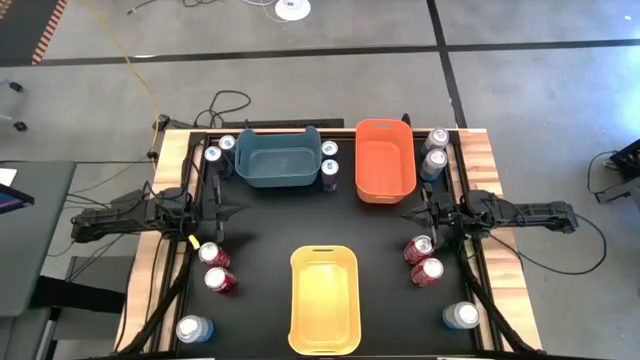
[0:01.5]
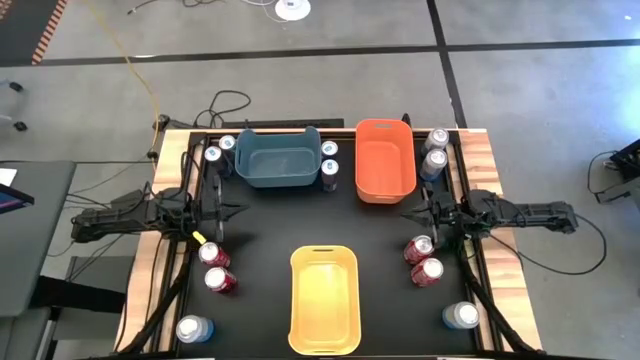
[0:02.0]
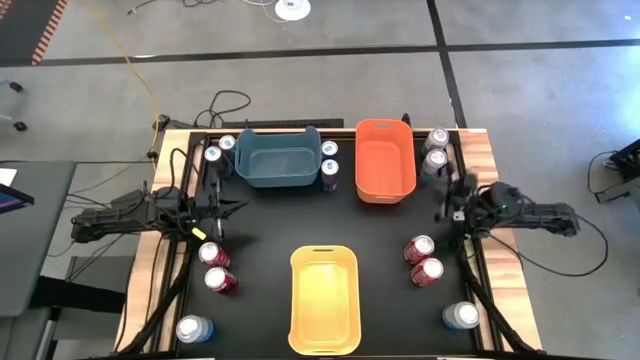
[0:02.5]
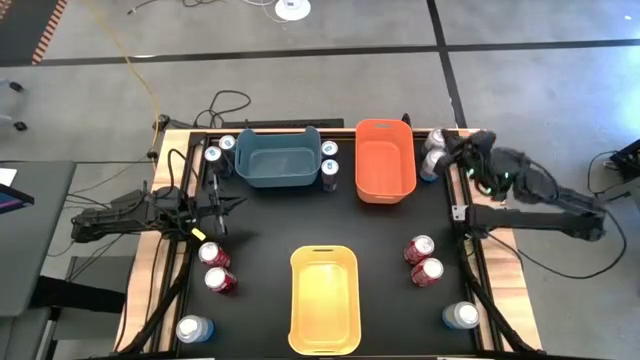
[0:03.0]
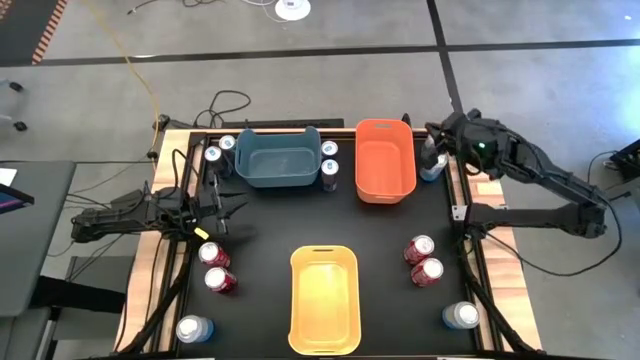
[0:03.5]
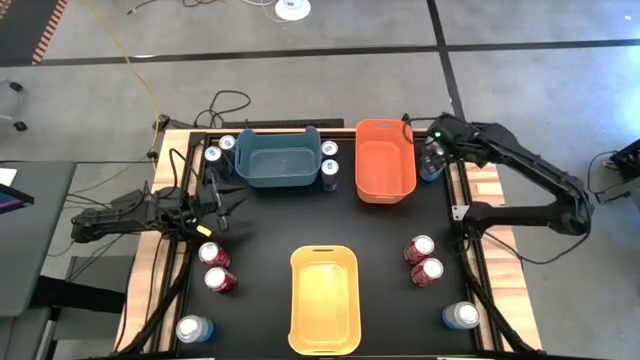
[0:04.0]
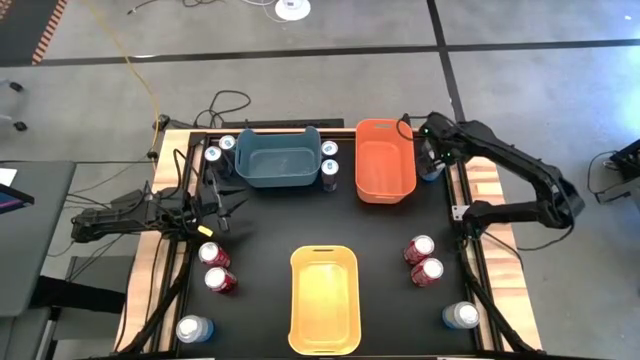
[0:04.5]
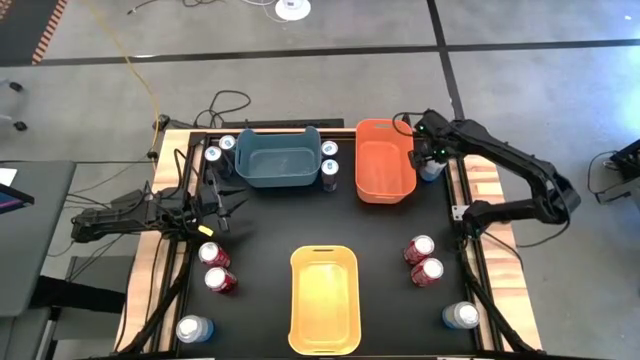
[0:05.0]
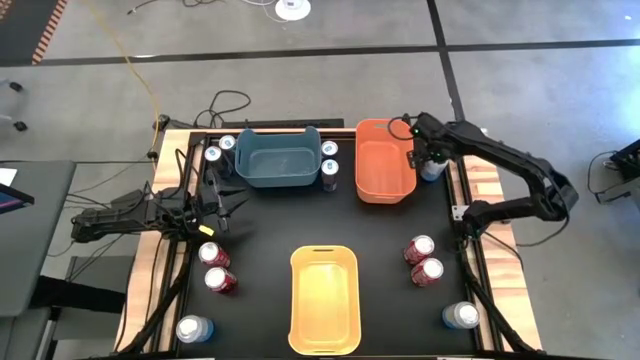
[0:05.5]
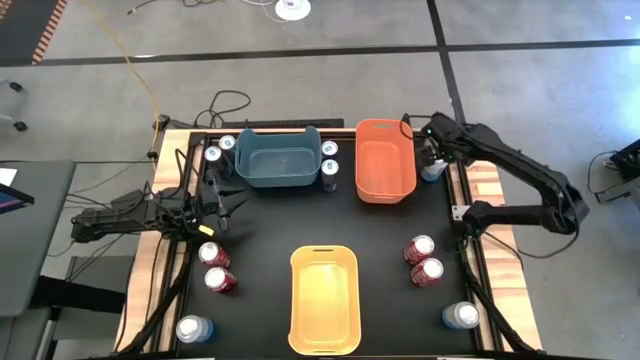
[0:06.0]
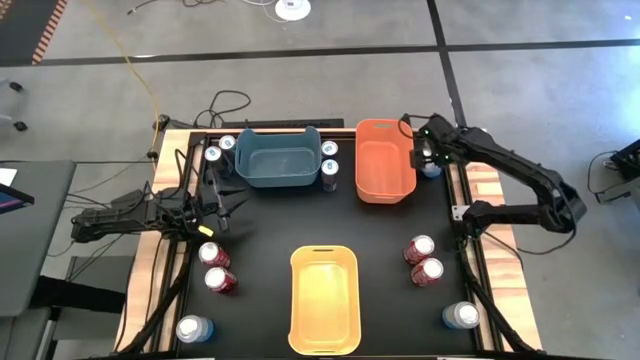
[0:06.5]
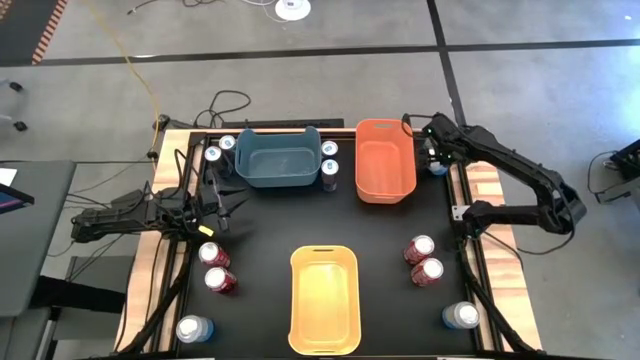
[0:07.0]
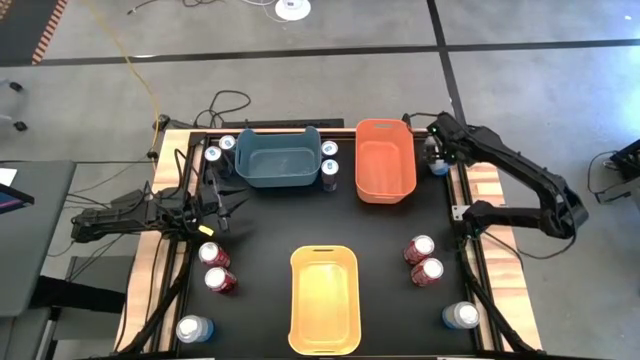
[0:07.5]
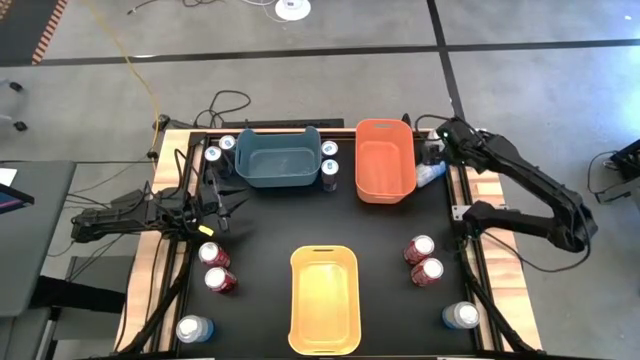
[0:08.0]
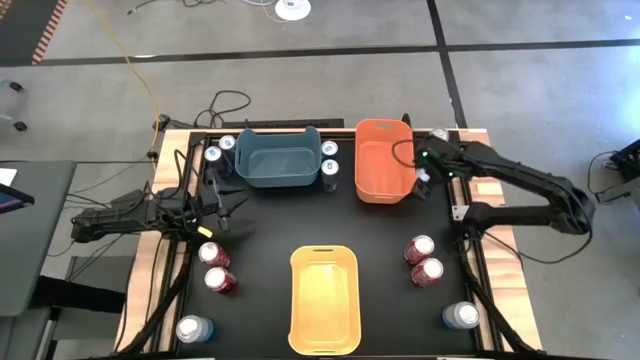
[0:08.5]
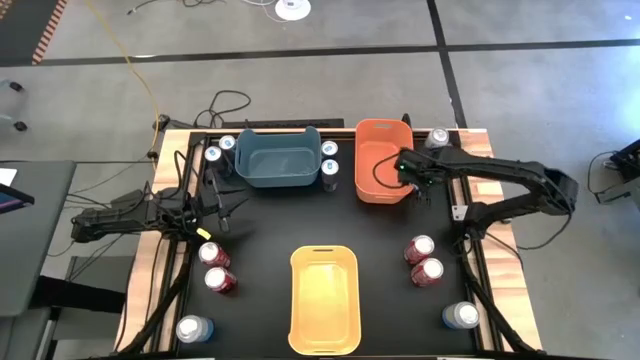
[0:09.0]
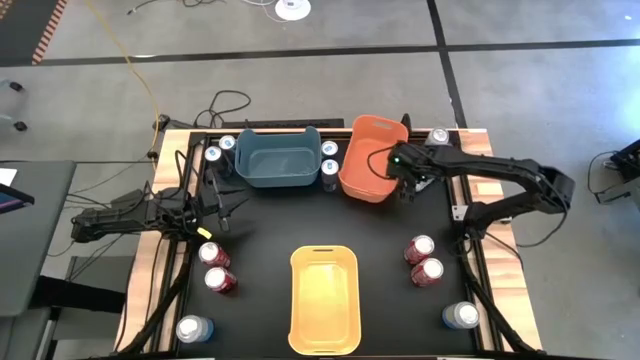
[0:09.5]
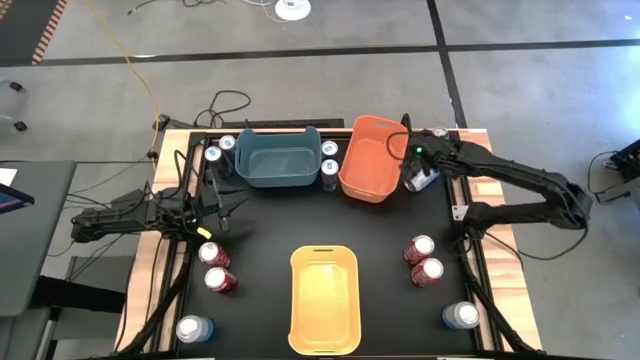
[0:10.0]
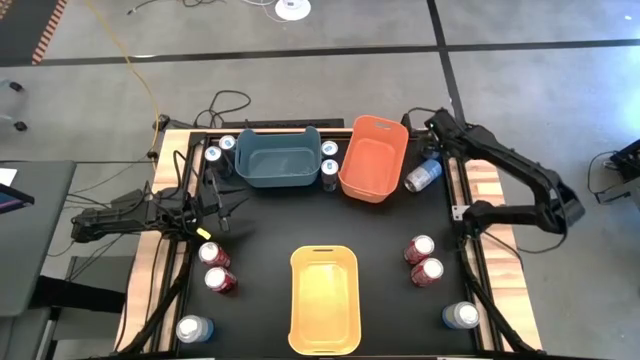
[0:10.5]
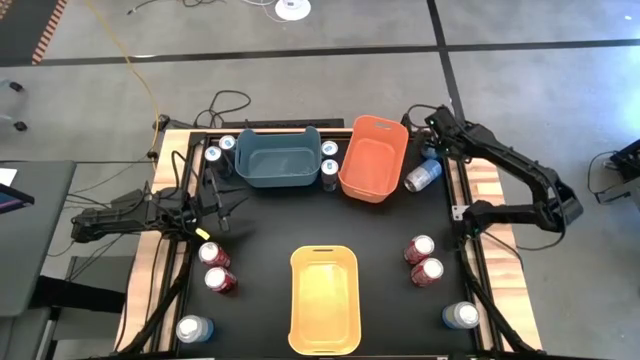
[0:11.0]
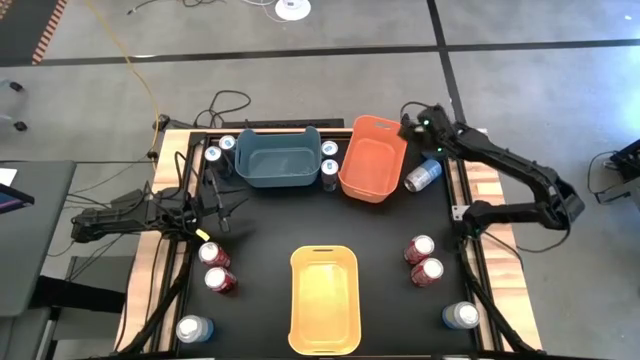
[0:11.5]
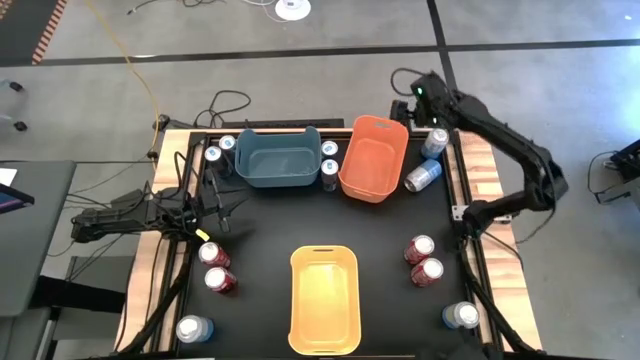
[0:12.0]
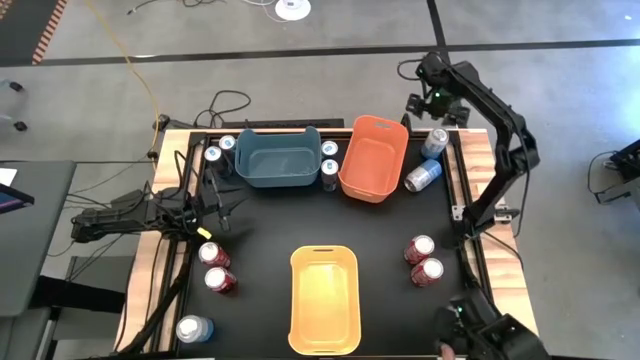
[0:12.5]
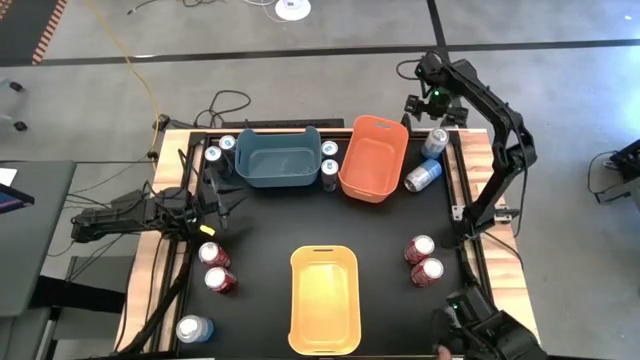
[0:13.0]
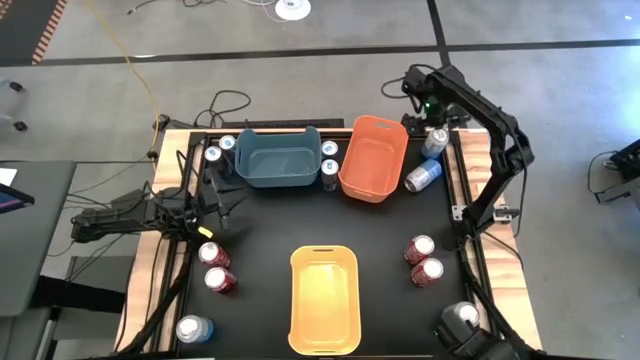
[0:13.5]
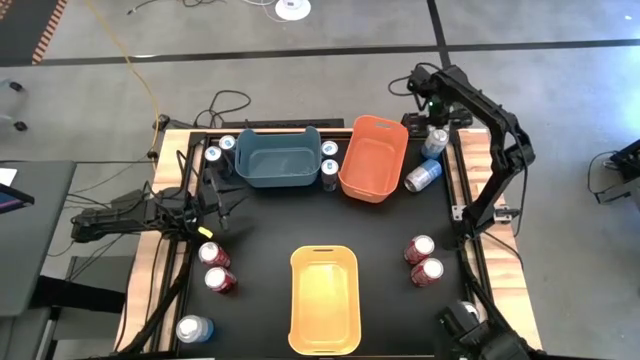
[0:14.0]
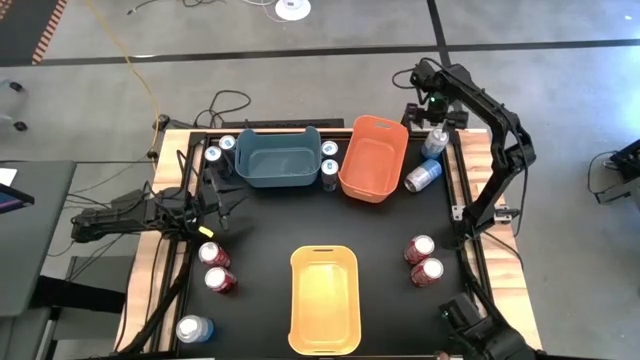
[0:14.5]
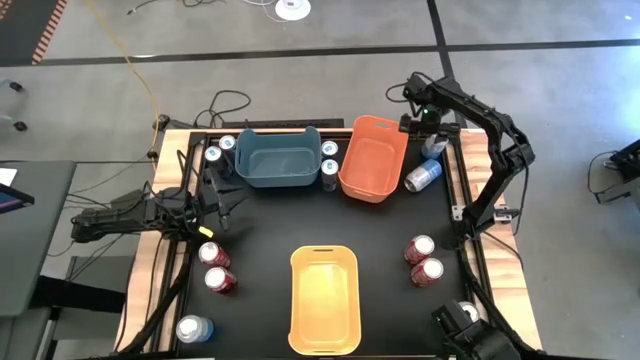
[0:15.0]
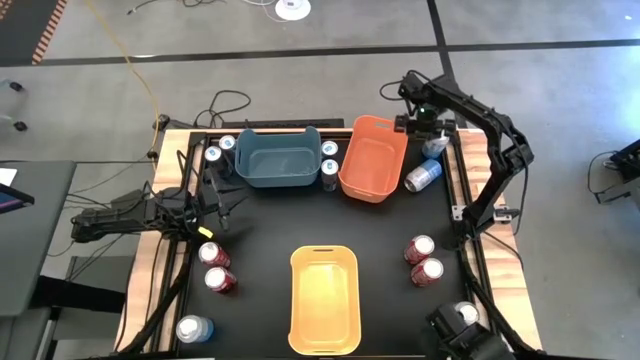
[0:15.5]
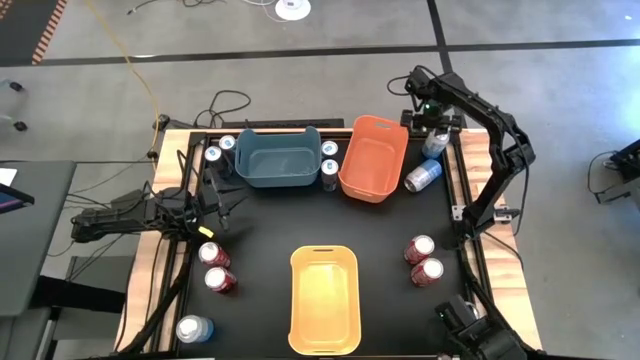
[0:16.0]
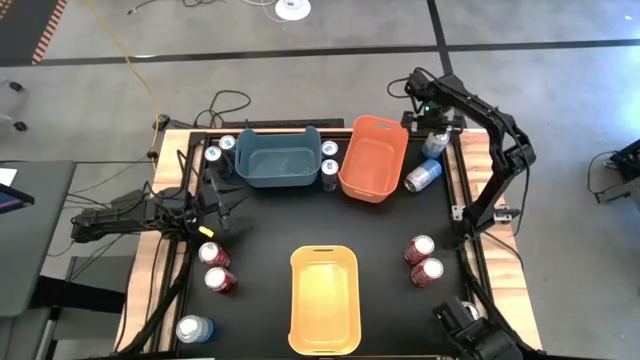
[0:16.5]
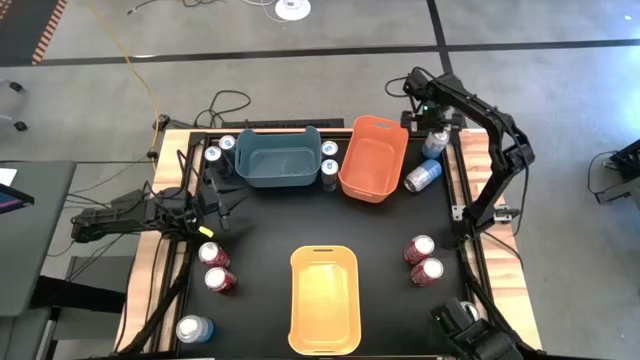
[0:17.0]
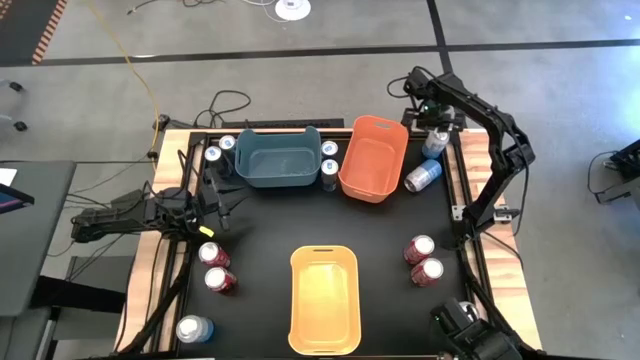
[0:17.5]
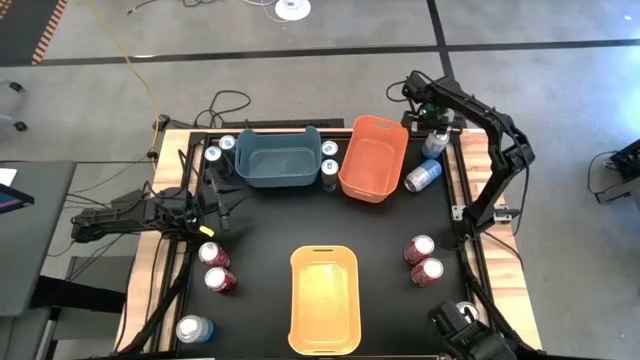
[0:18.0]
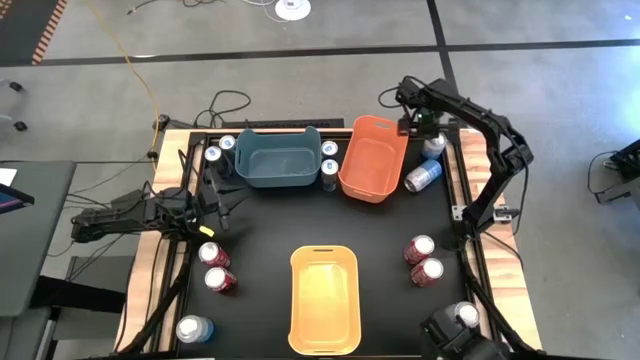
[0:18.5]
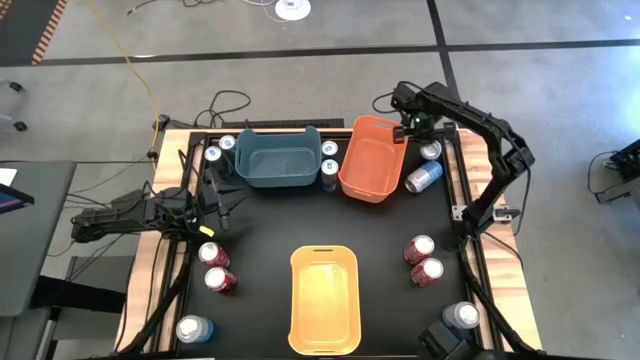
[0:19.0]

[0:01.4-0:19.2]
Task: Sort soda cans
Put the blue white soda can into the yellow bin
